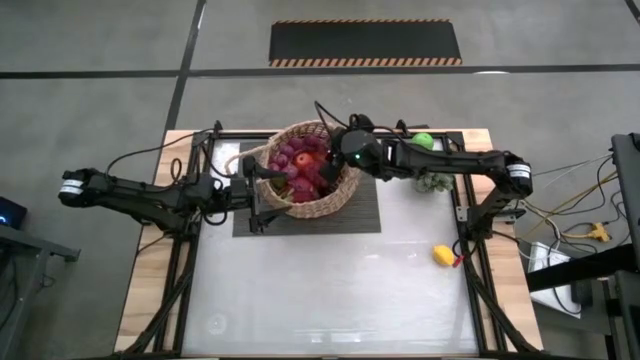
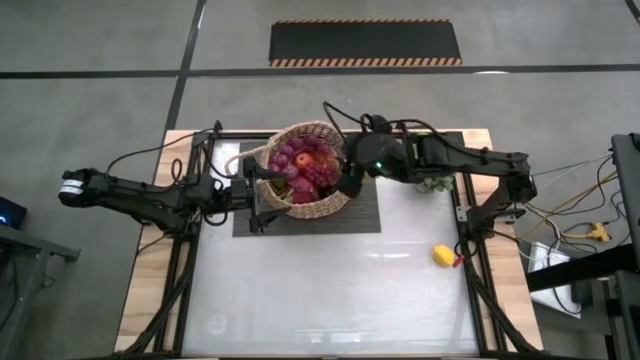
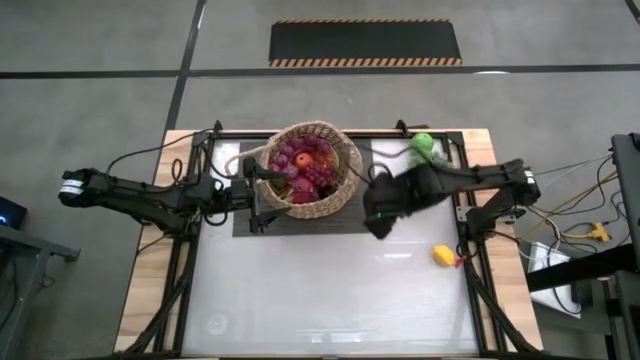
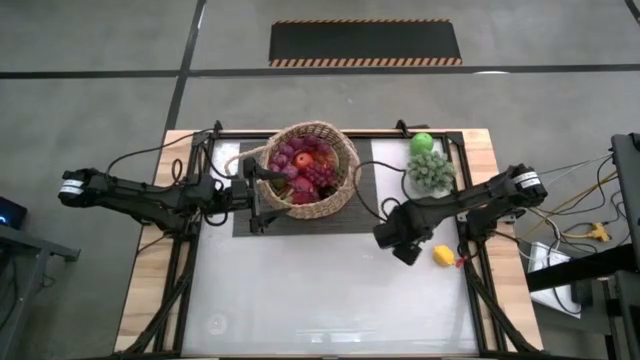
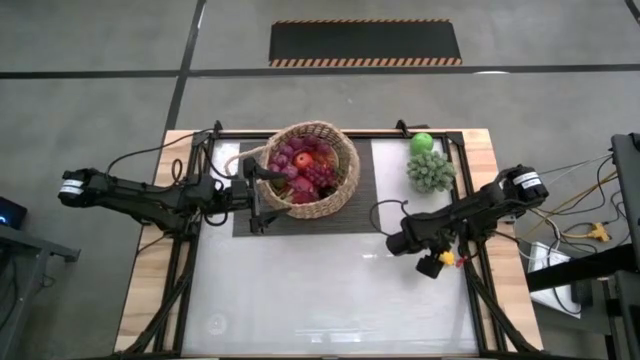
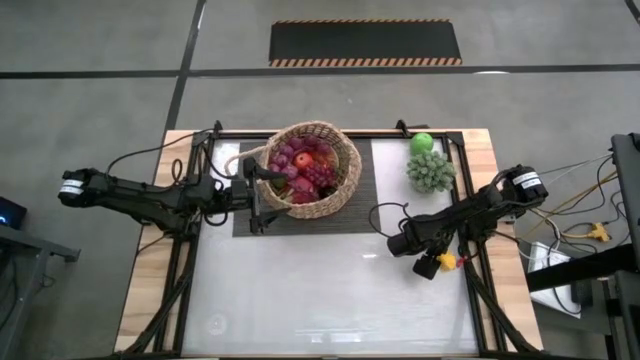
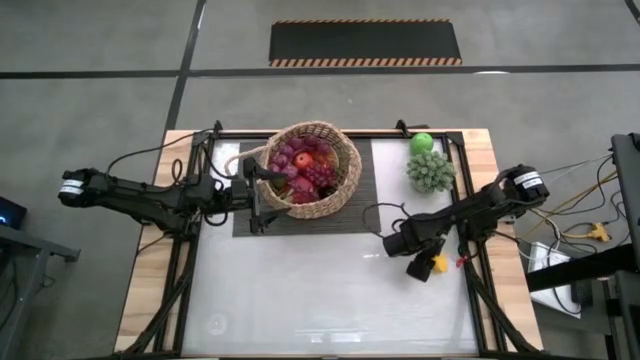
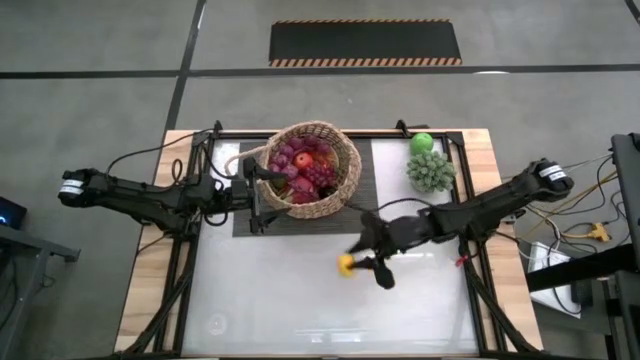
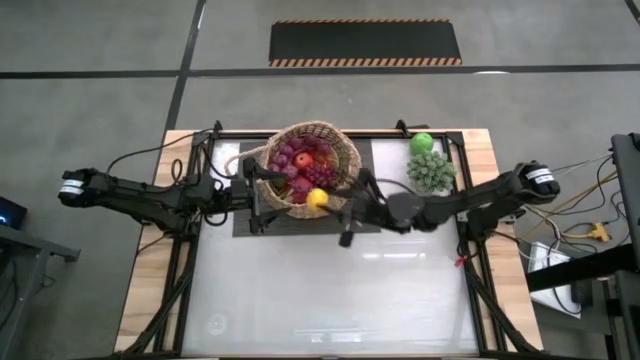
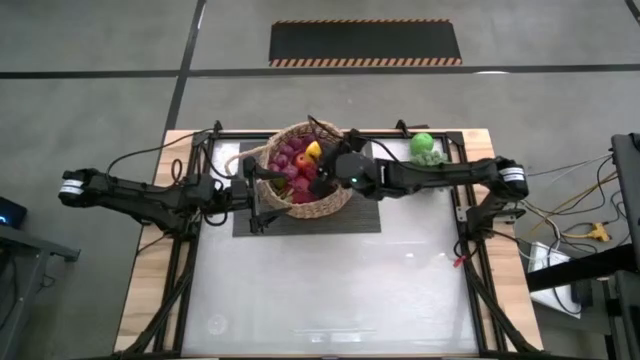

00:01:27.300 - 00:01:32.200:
Task: Build produce basket
Put the lemon into the basket

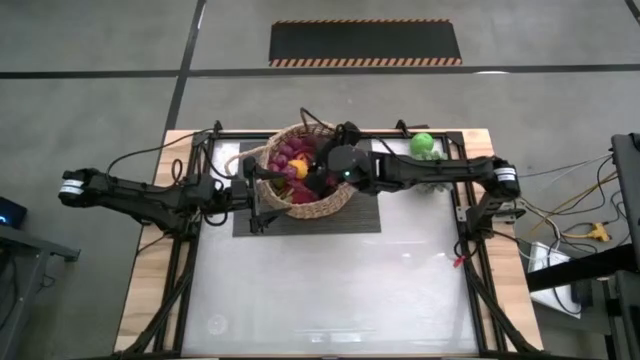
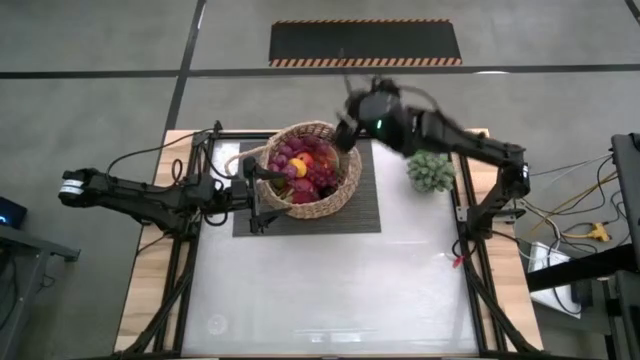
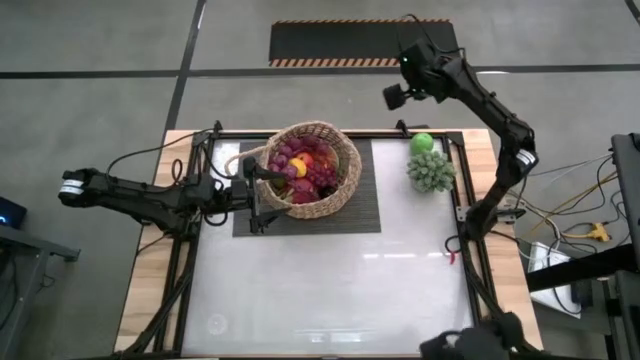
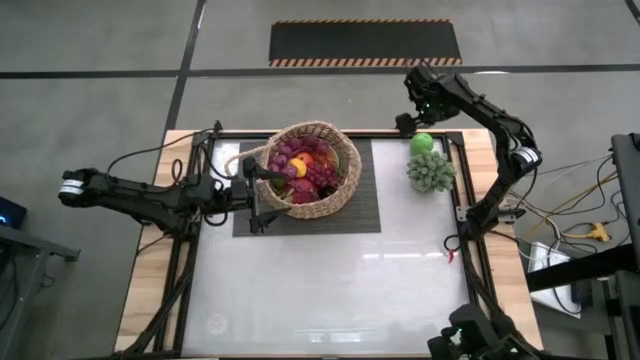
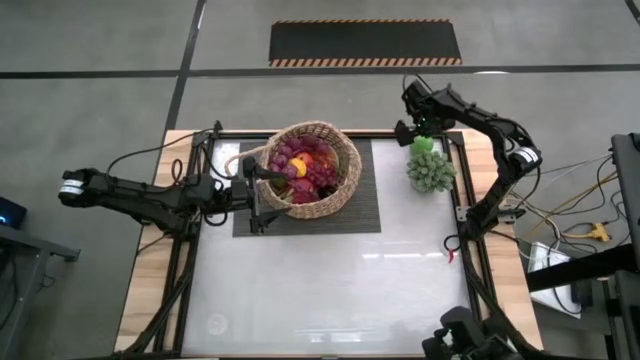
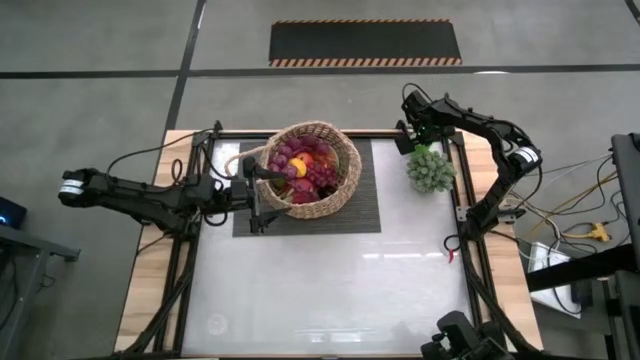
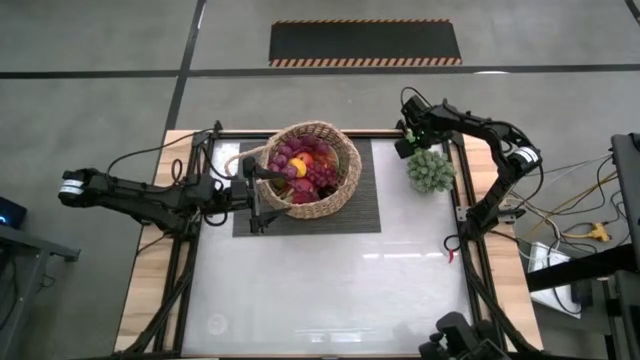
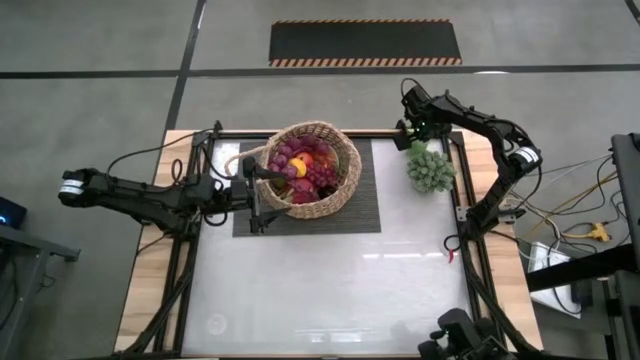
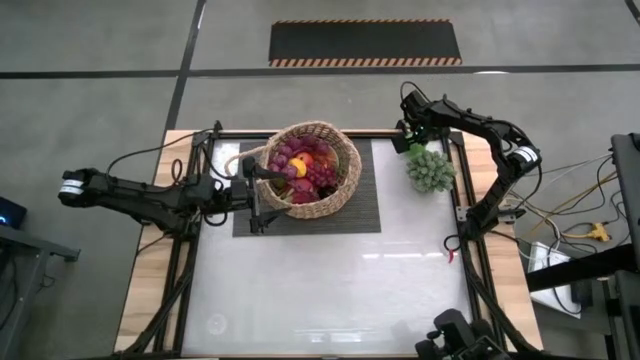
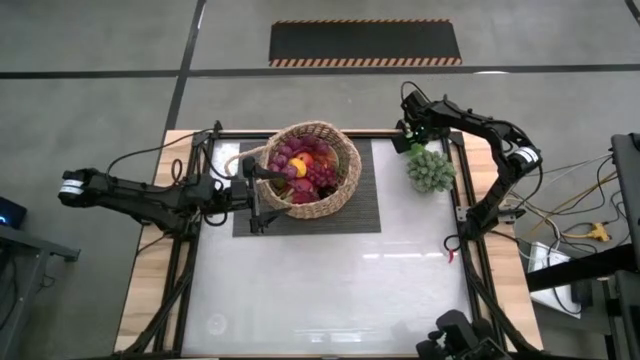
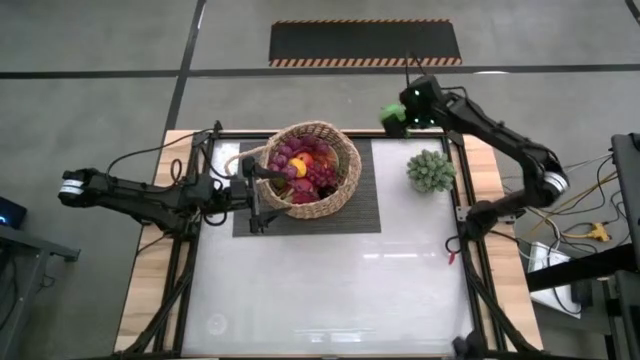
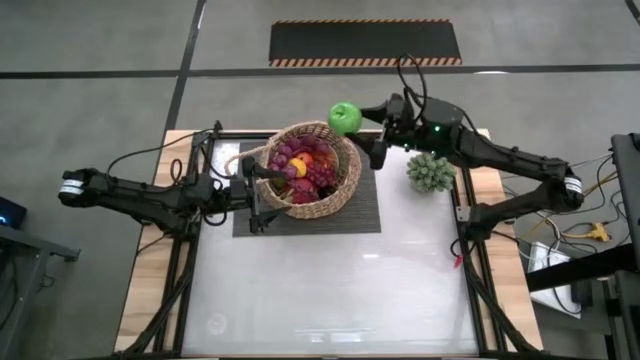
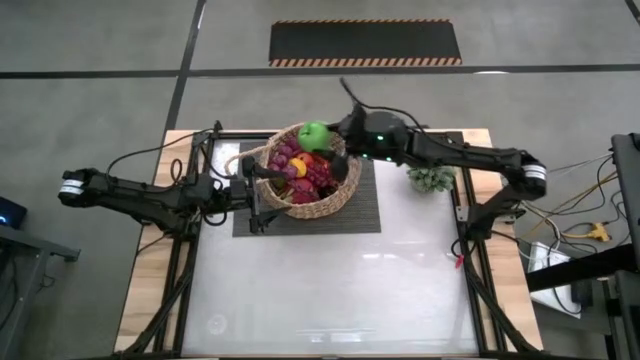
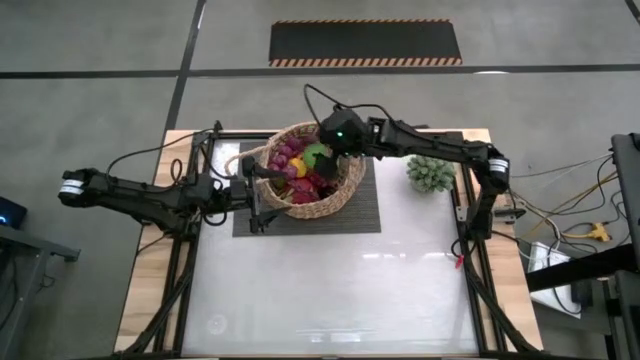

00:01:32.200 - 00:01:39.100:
Put the green apple into the basket

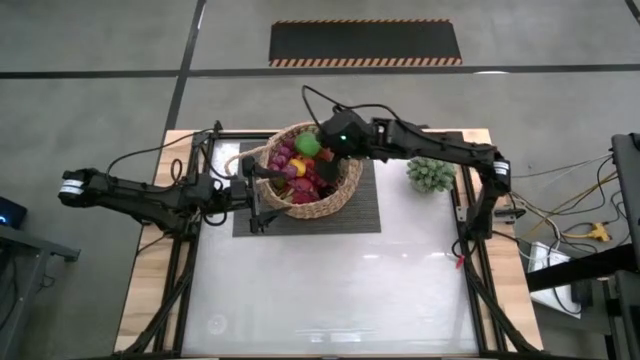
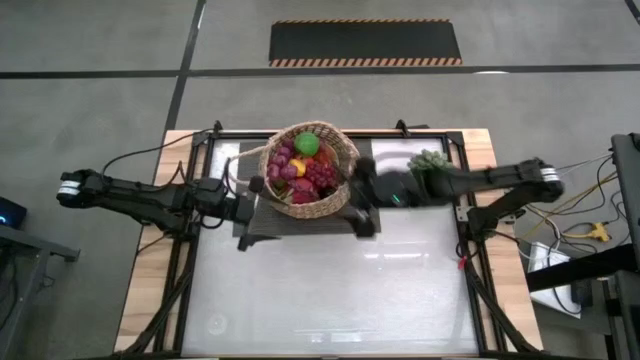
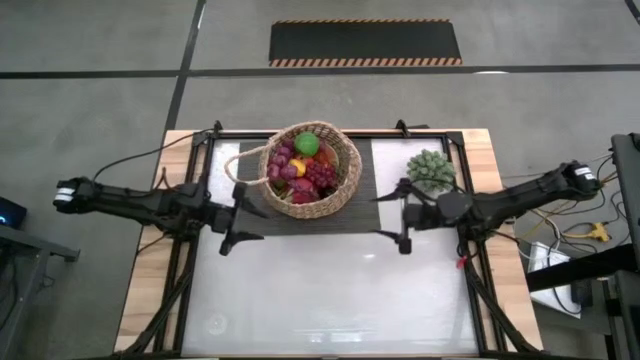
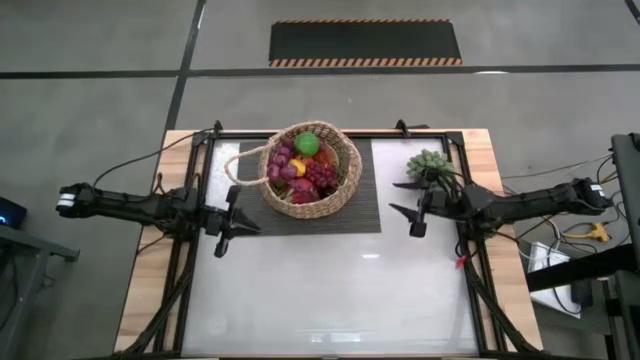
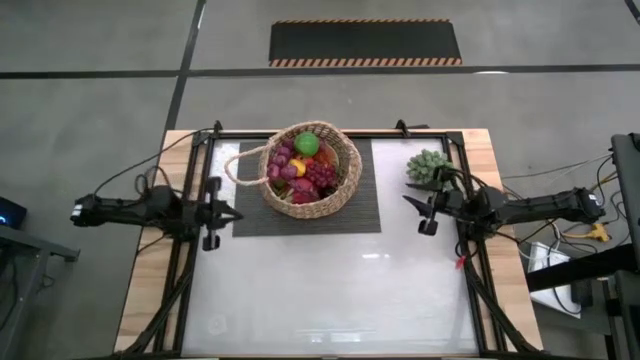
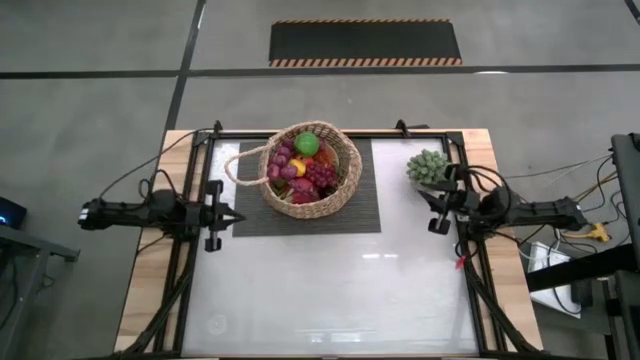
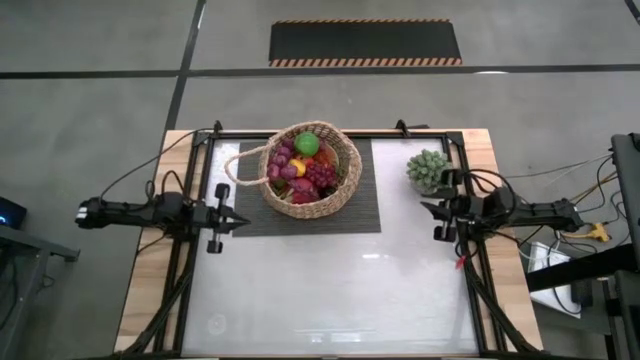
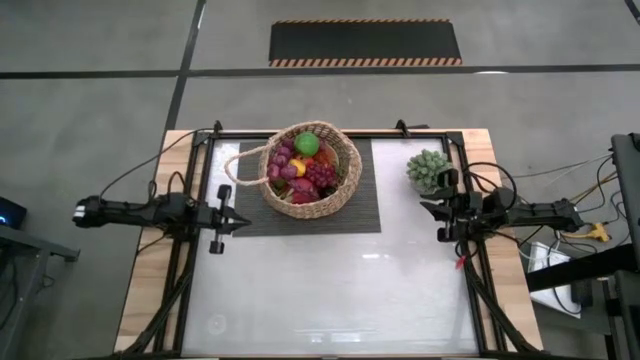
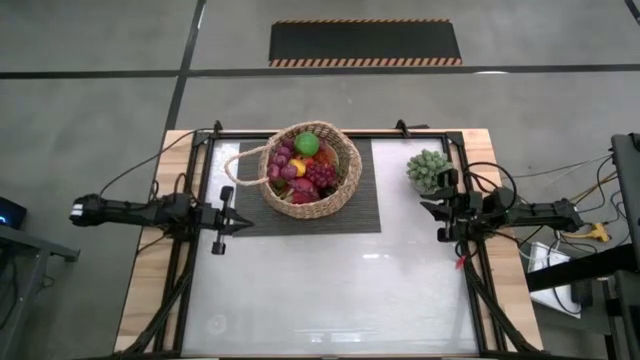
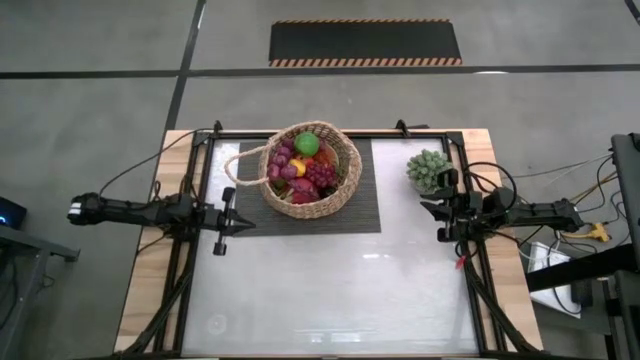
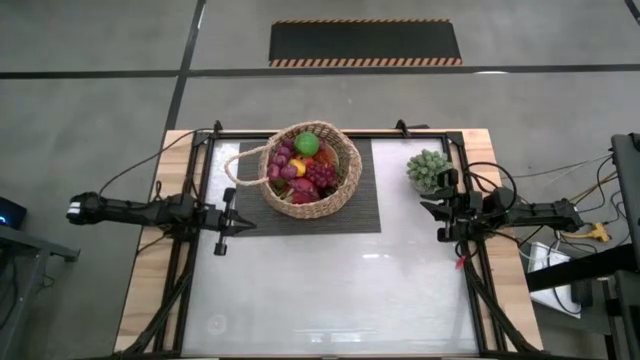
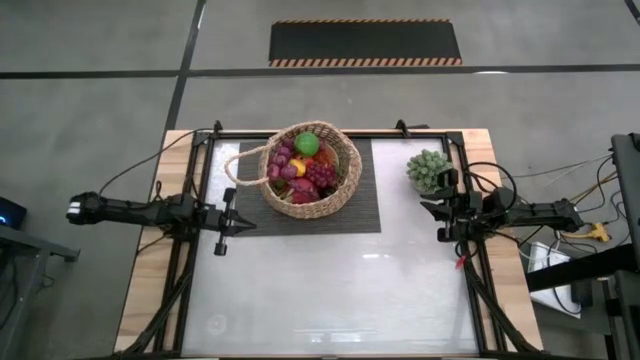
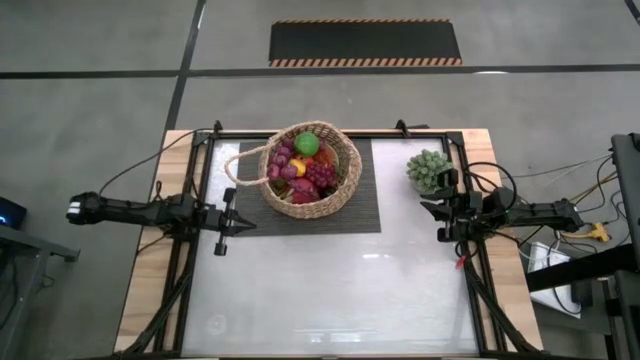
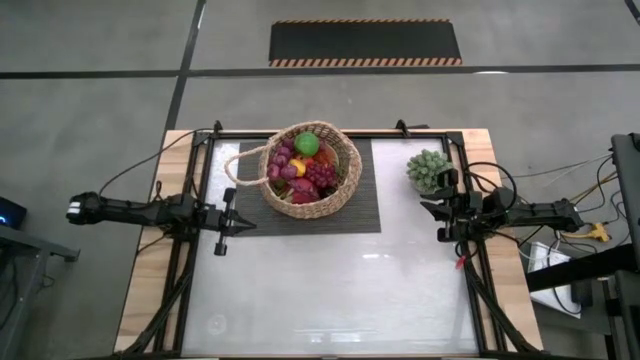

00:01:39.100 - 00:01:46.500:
Return to Home Position

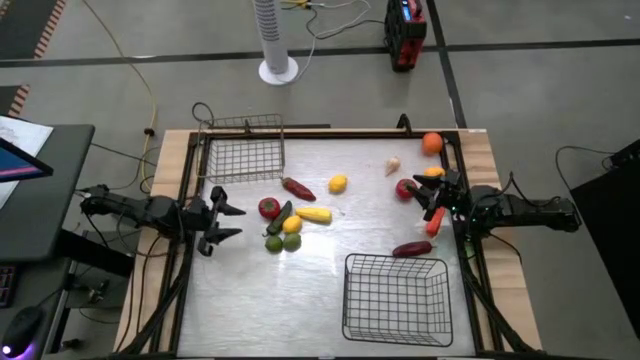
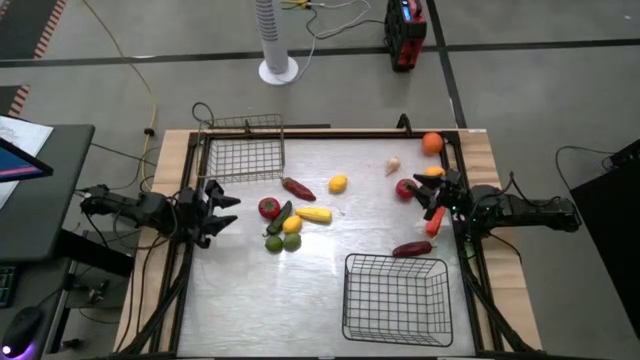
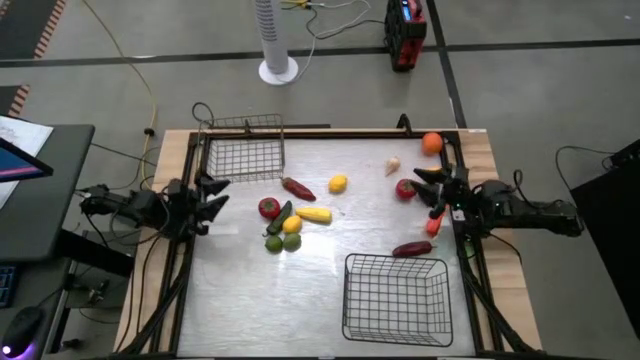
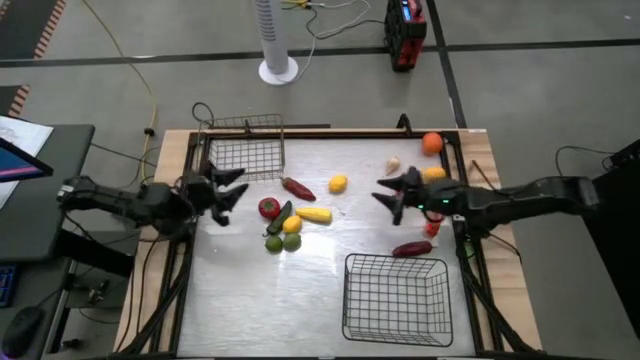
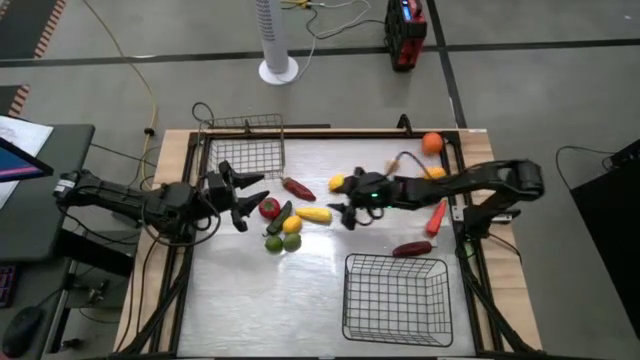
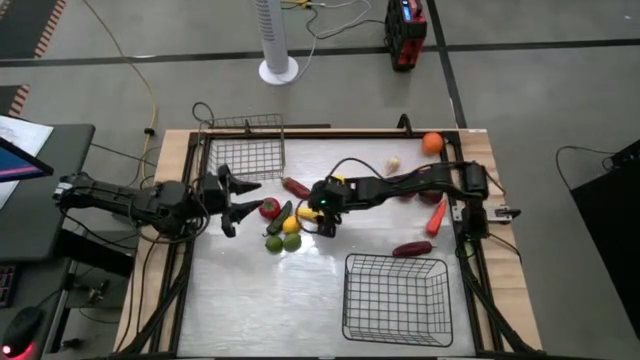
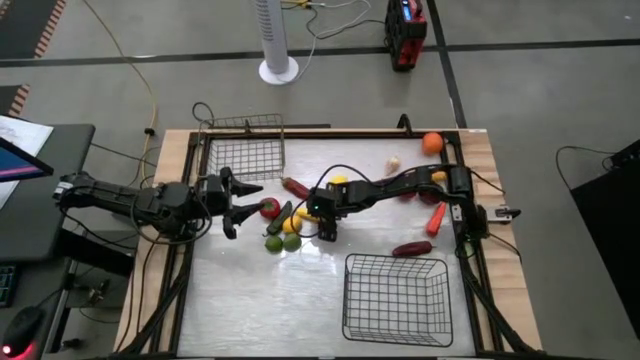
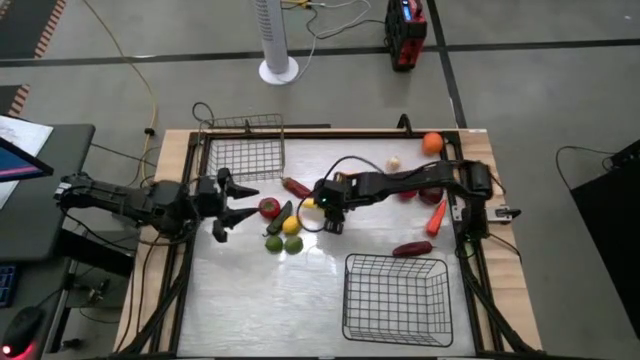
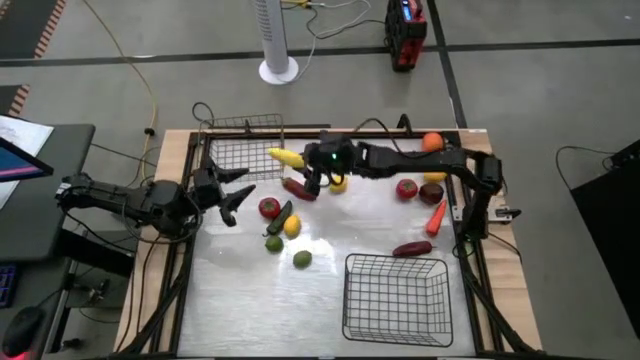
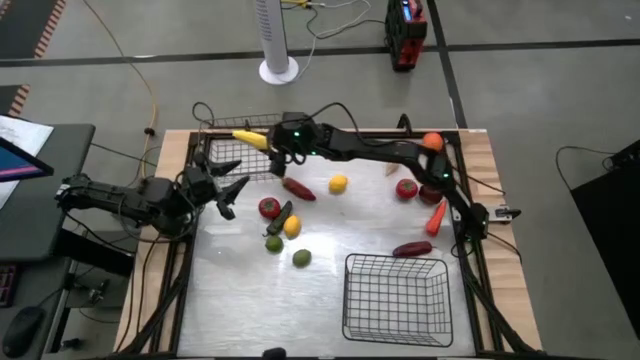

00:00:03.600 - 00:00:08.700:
Task: Sort produce into baskets
Put the corn into the top wire basket
